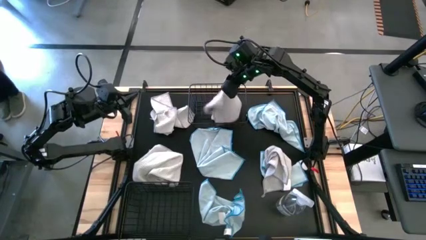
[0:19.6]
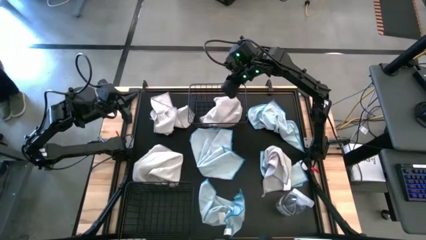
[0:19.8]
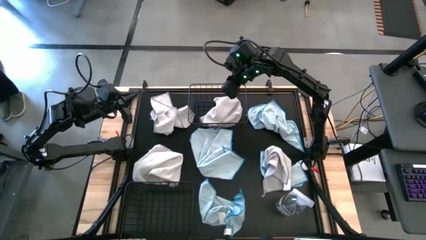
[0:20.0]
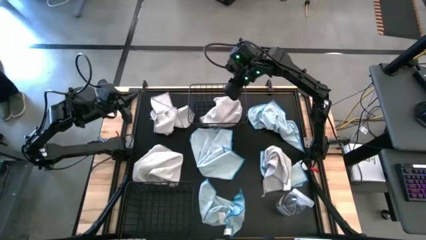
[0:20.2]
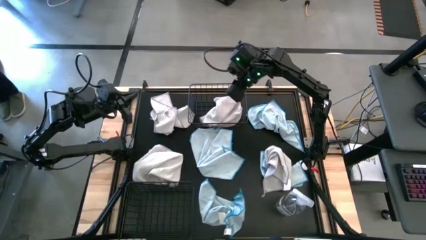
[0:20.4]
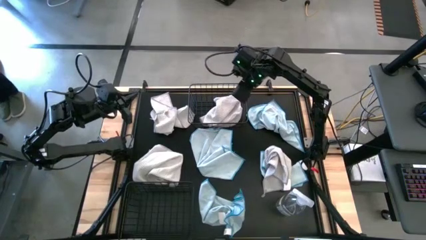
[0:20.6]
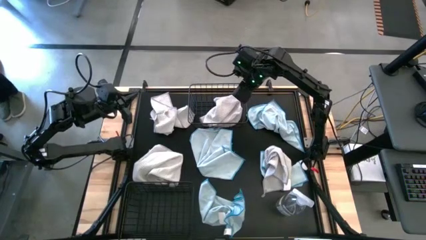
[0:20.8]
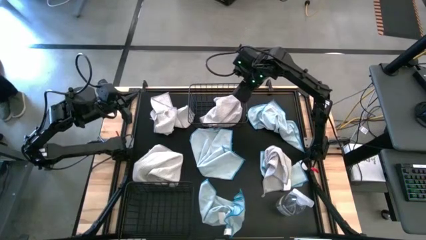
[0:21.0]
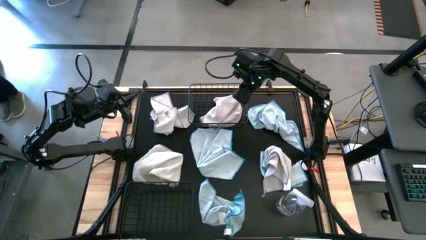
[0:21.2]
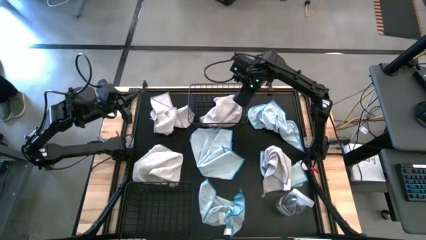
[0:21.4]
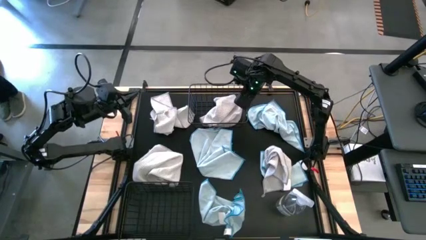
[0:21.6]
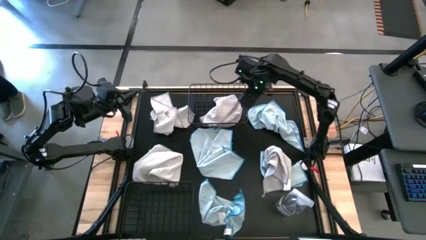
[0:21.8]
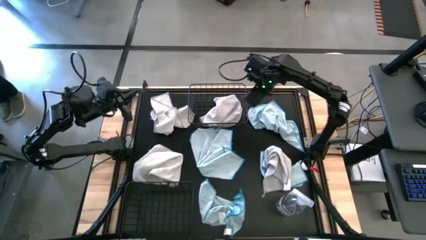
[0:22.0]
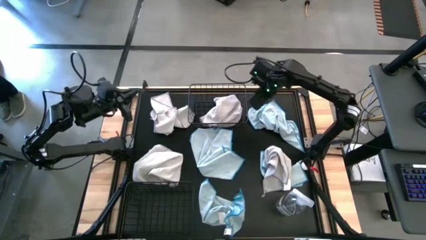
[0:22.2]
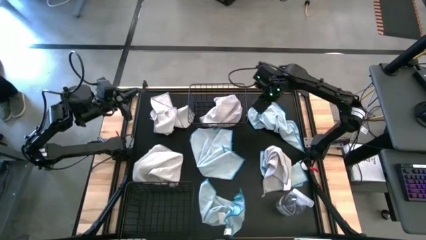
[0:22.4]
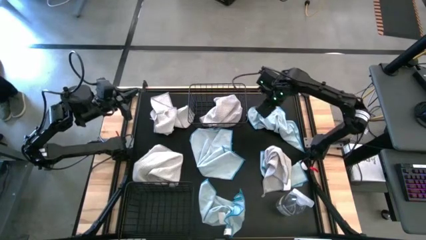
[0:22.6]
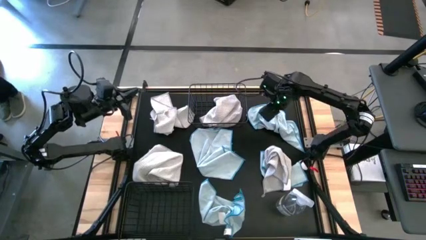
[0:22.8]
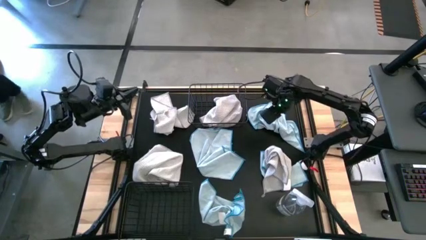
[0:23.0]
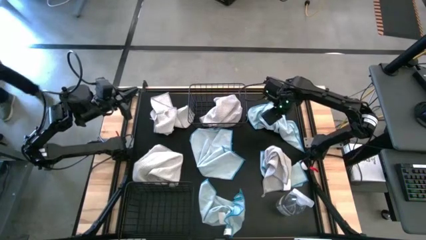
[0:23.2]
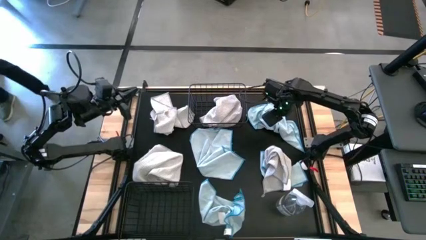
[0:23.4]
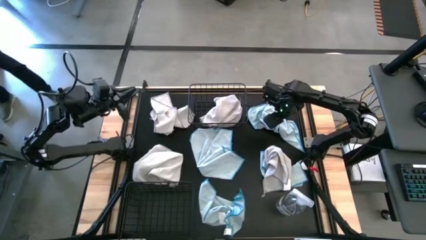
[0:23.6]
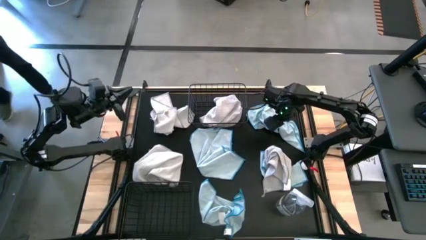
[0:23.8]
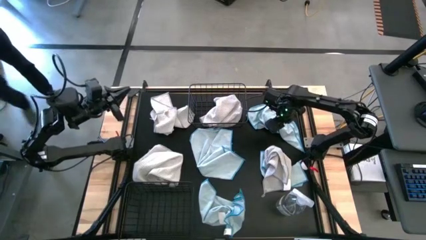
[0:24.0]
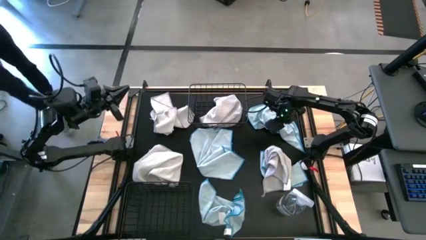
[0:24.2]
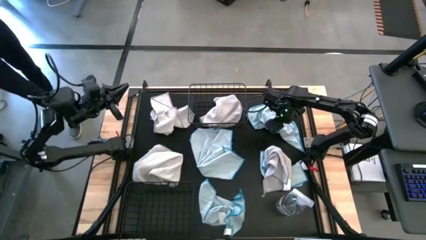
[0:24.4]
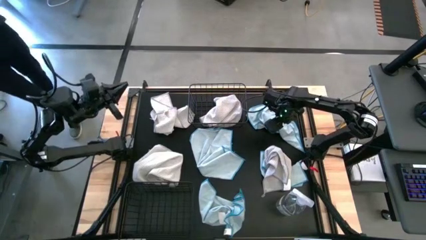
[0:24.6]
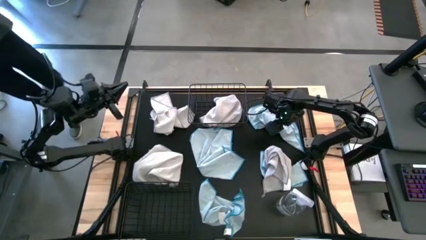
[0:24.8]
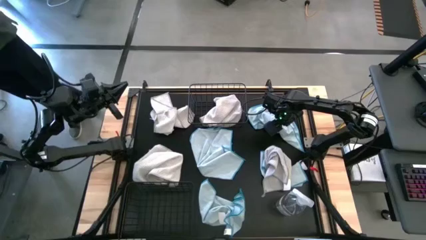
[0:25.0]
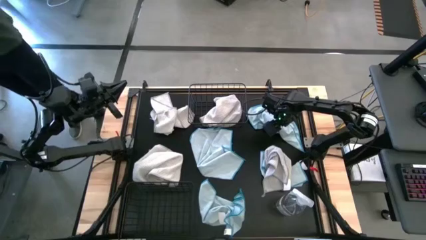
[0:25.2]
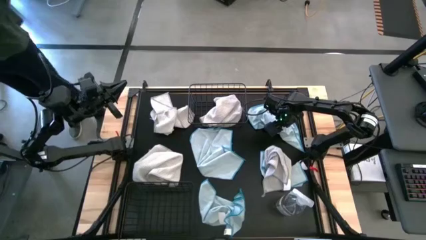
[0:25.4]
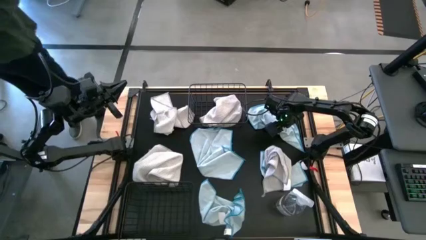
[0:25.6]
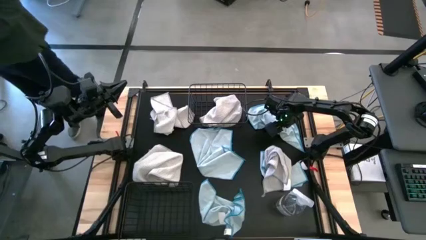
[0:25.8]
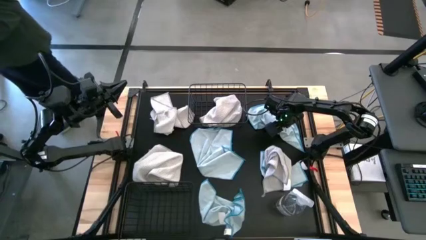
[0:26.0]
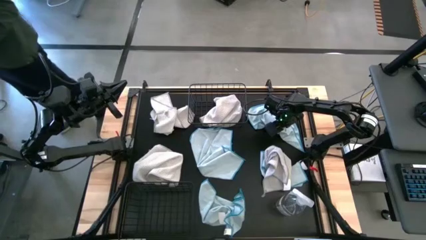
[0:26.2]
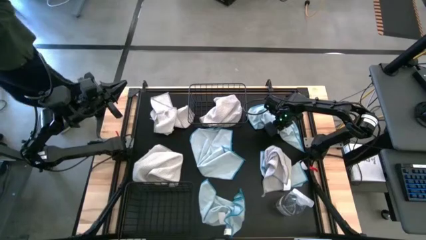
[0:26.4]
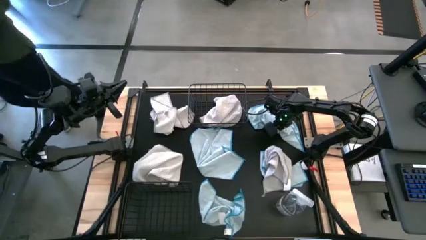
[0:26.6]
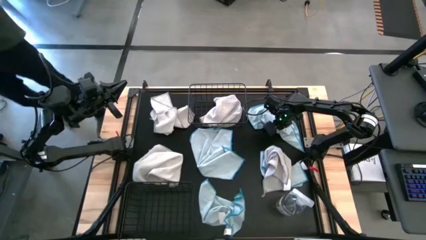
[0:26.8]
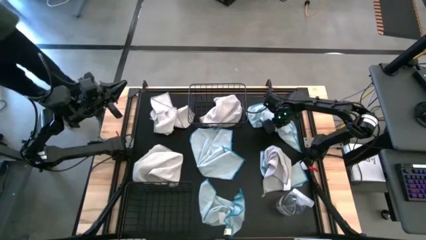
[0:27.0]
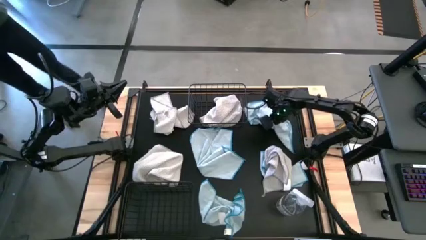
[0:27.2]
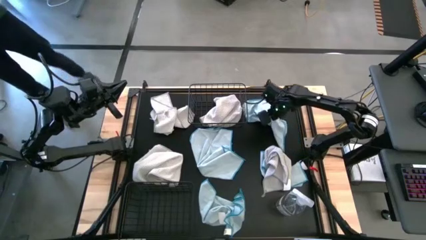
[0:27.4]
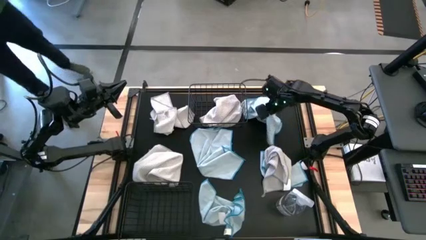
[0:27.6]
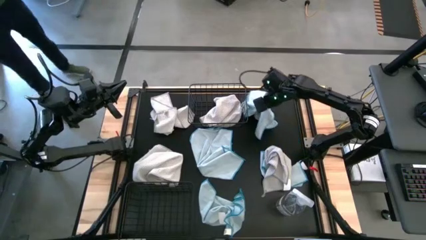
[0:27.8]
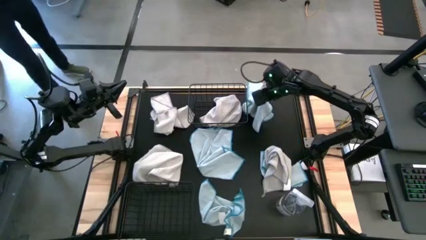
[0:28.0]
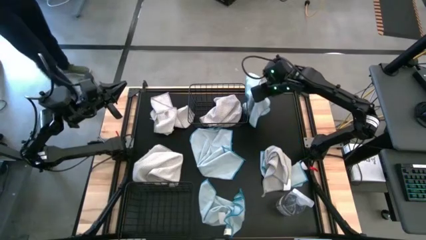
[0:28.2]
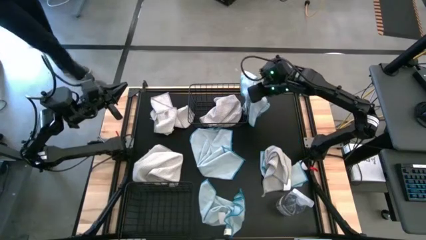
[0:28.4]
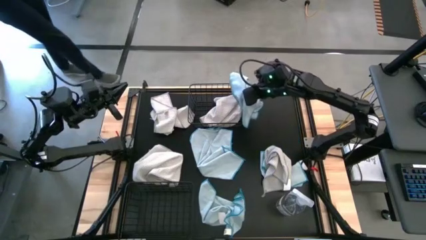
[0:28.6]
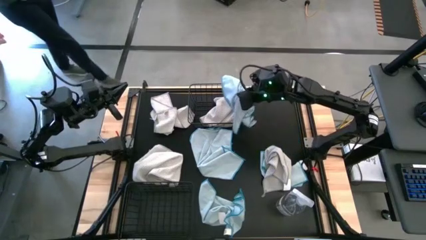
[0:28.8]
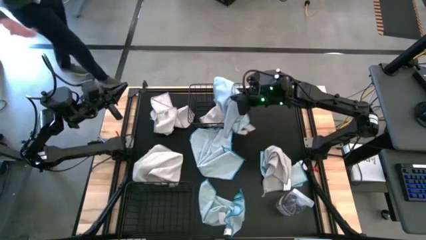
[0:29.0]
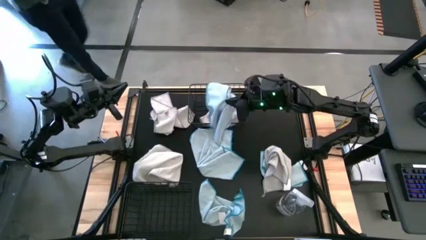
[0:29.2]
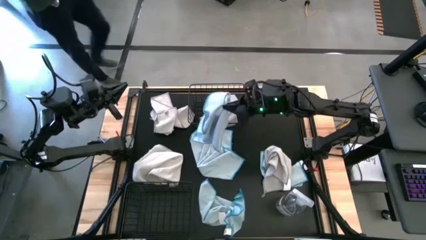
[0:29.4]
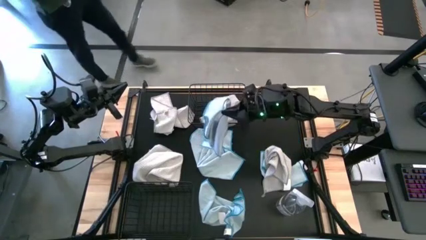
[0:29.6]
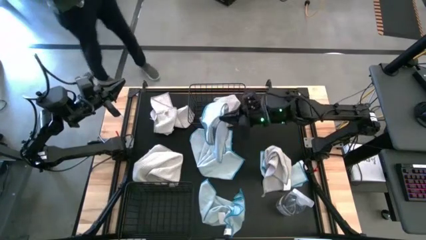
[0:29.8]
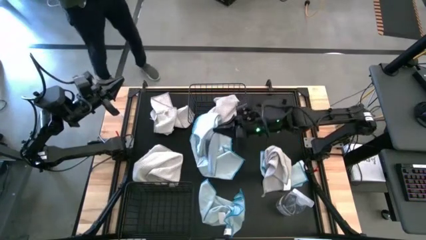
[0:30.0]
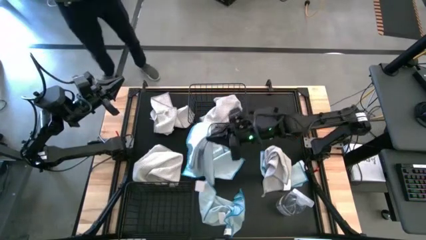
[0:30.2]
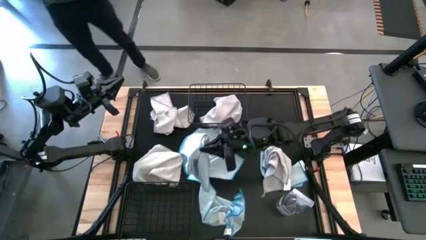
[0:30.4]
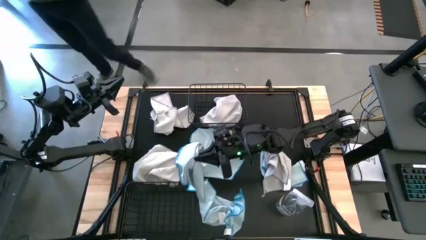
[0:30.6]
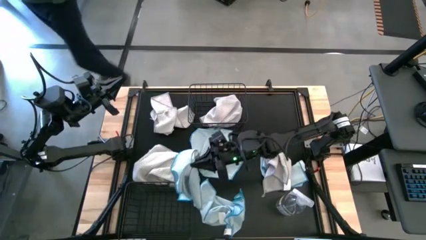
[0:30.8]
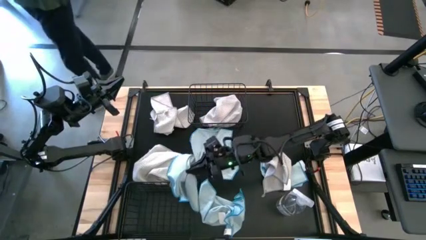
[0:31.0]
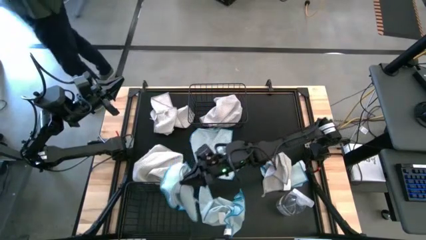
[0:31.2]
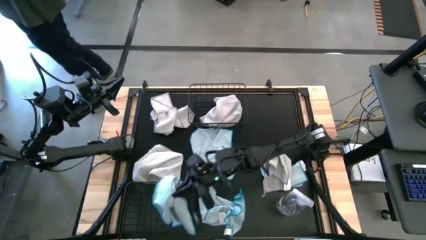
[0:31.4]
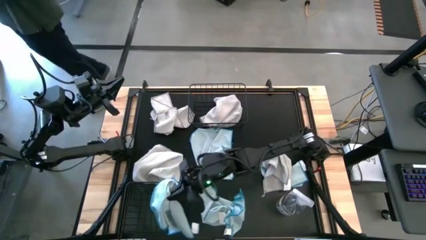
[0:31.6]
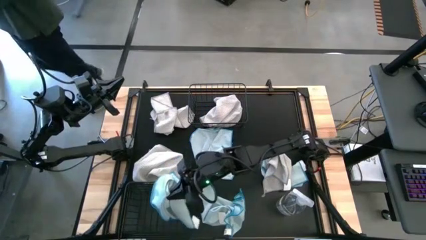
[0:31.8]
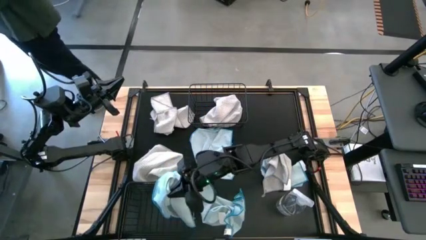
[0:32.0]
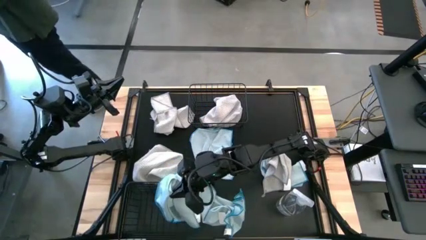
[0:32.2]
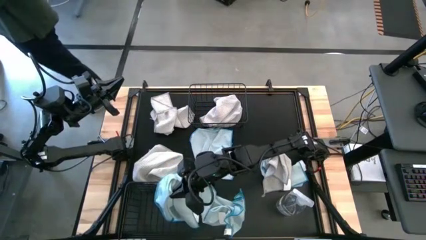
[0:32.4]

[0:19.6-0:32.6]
Task: Sort microfiber towel by color & place in baskets
Put the top right blue microfiber cloth into the bottom wire basket
